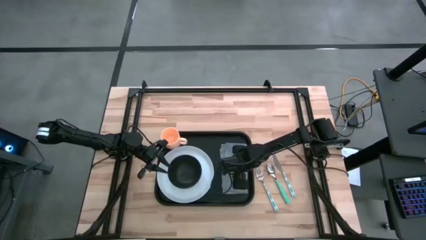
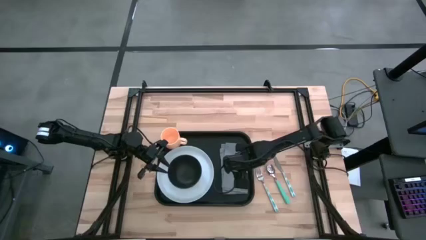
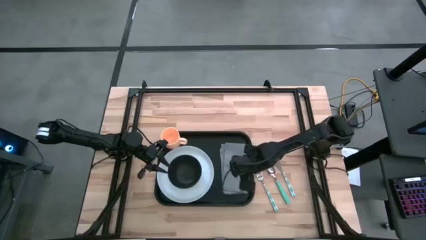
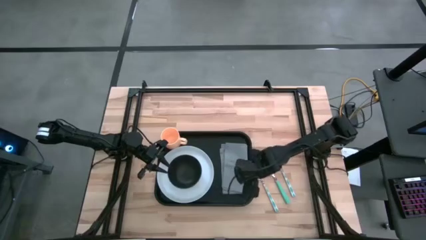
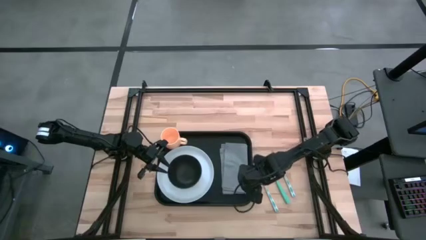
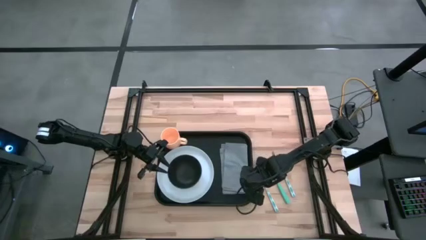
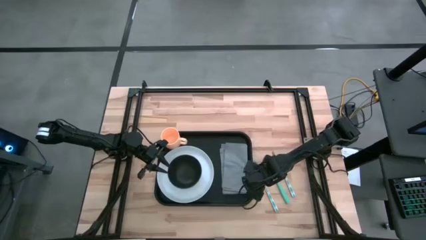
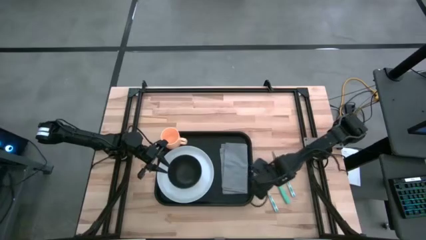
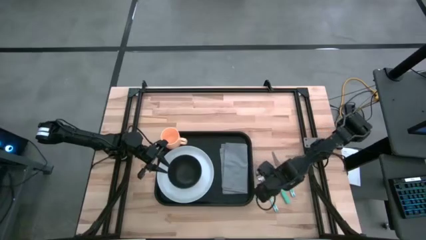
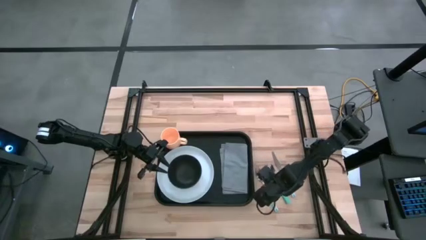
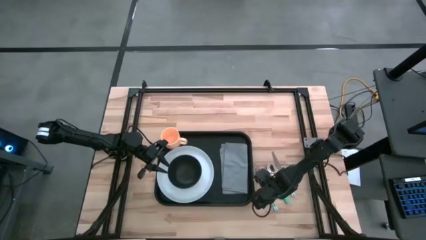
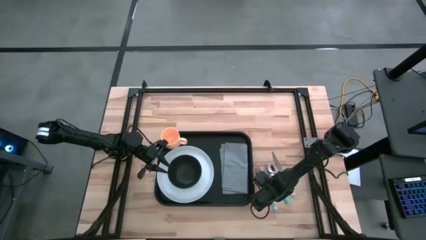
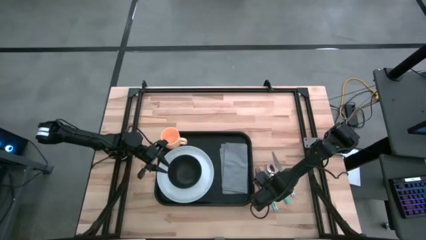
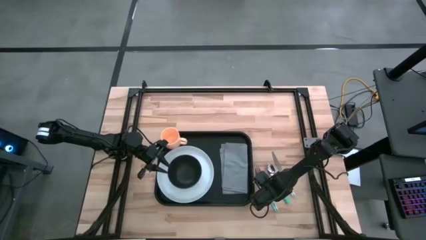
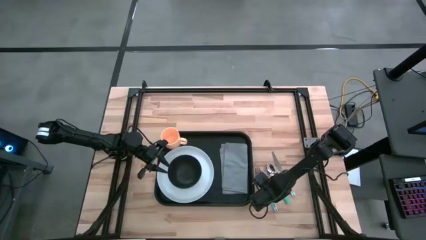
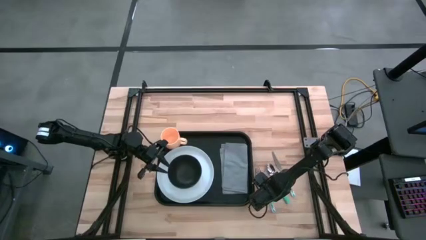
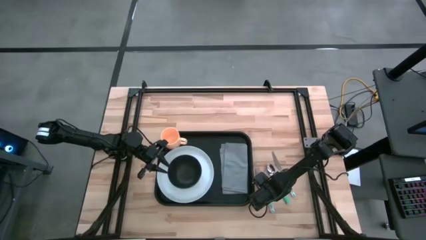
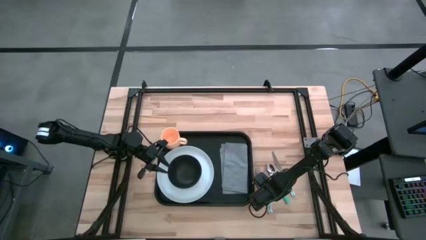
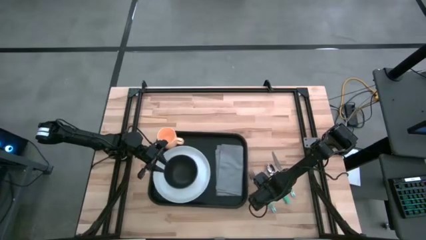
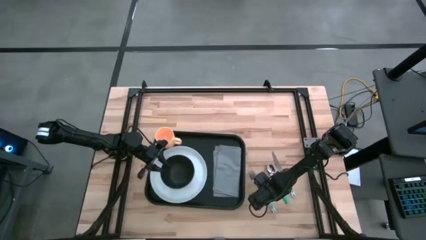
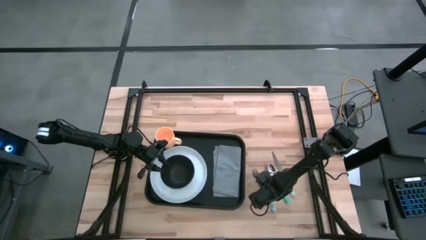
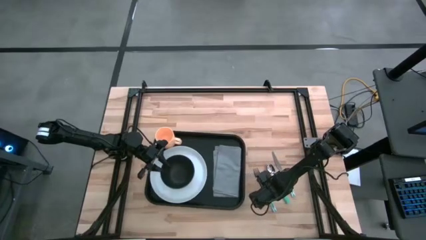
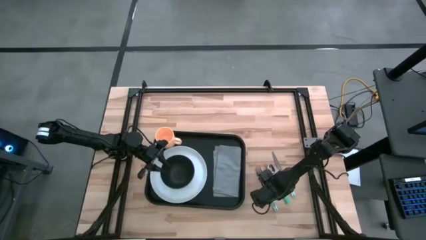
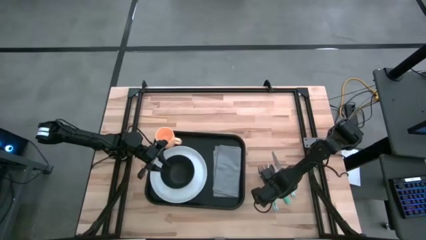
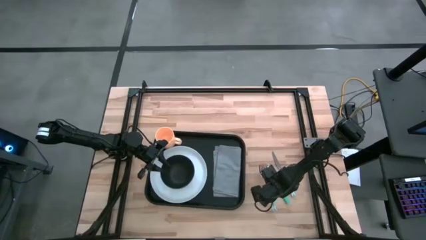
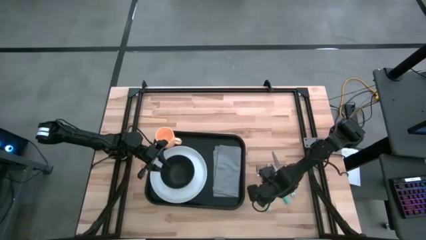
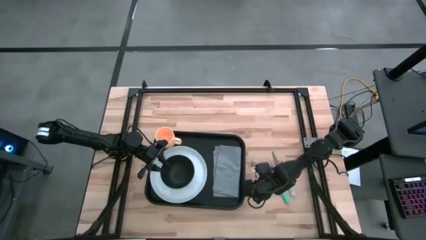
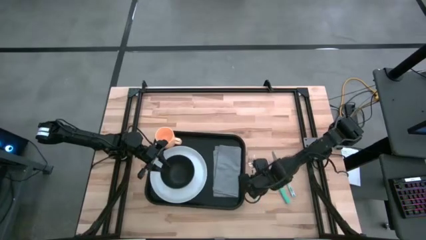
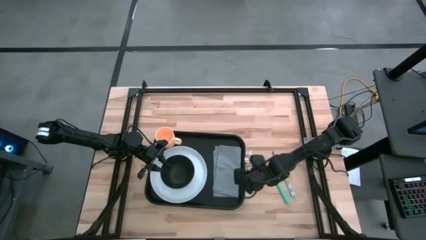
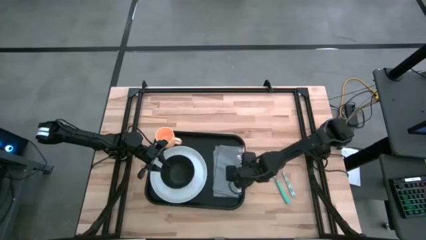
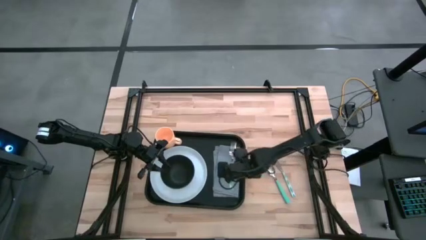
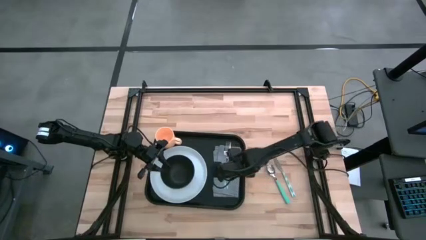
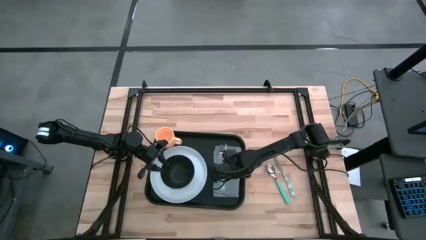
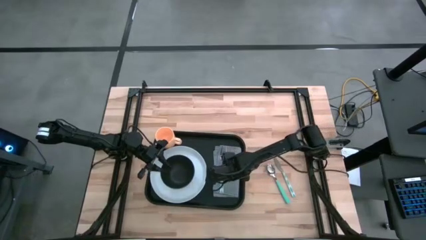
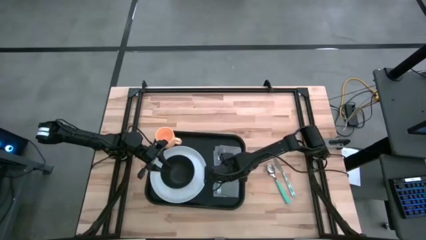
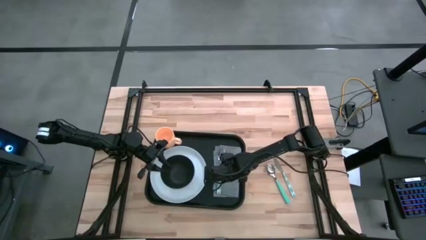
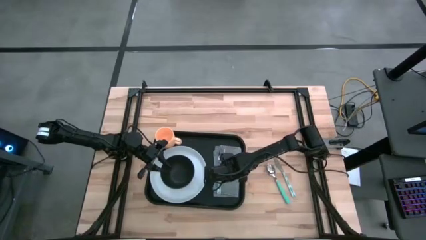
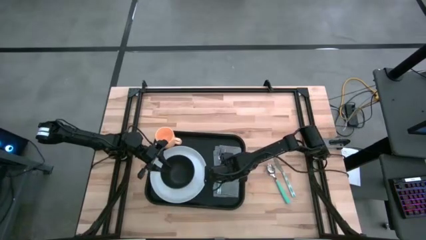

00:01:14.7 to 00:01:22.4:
Task: Set up tray
Put the fork on the left side of the napkin on the serving tray
